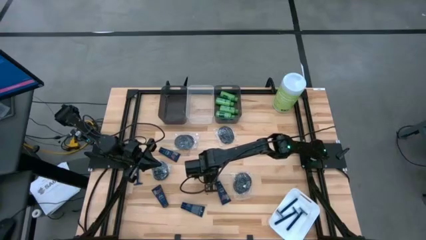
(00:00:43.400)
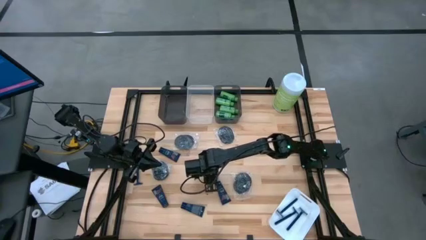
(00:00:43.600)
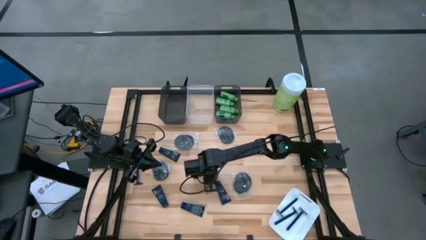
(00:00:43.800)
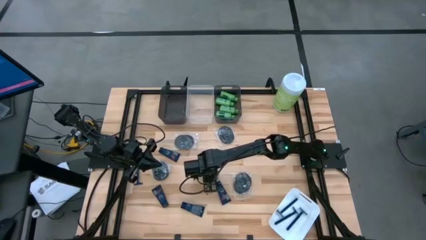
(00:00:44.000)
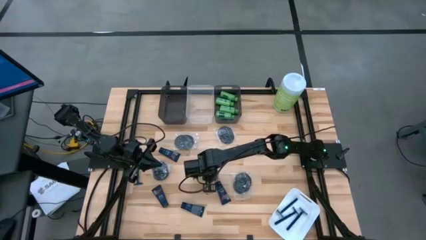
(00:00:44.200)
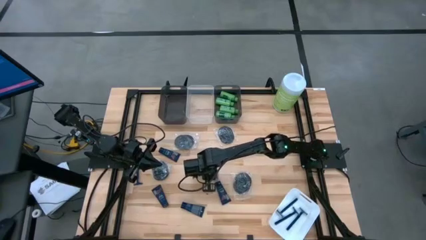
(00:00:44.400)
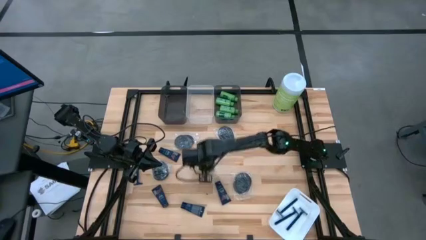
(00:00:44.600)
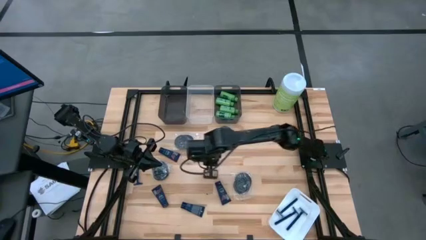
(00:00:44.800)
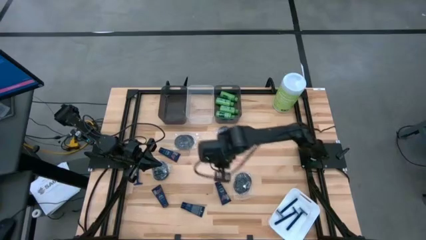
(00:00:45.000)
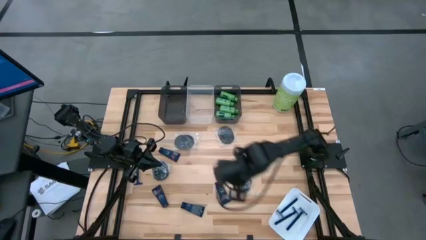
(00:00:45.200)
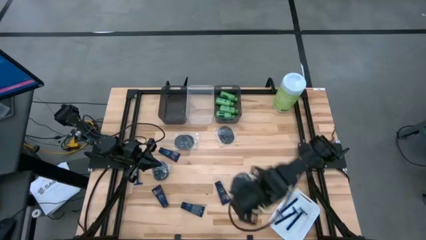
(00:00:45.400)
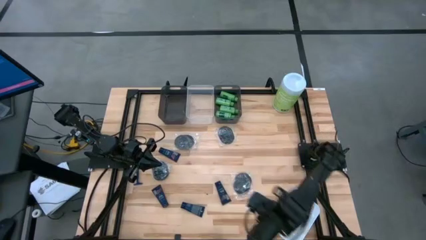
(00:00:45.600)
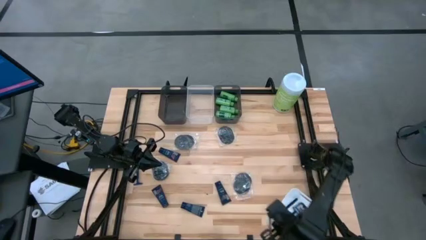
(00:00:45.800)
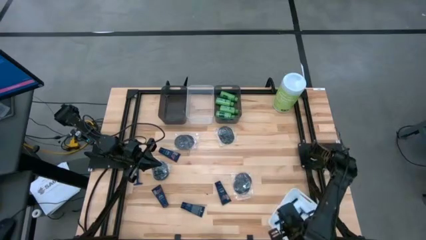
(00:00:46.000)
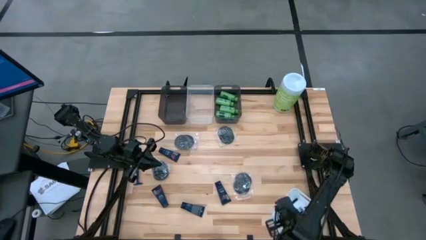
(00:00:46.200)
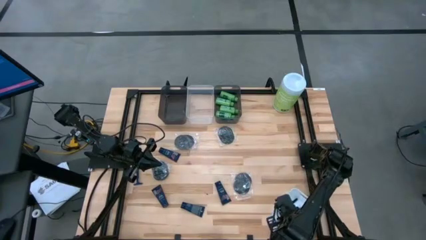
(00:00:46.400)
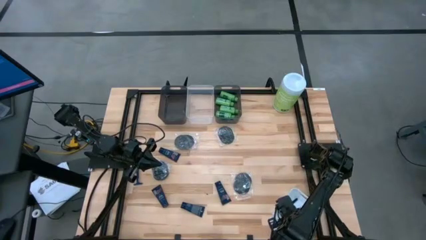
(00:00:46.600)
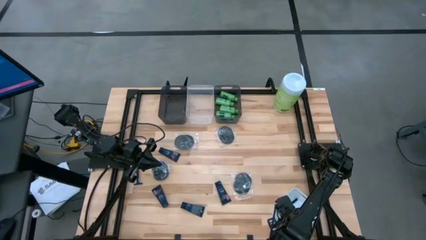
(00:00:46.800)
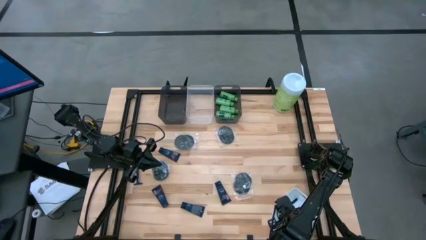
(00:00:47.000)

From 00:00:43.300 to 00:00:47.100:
Task: Pick & Place Travel size toiletries
Put the blue razor into the white bin

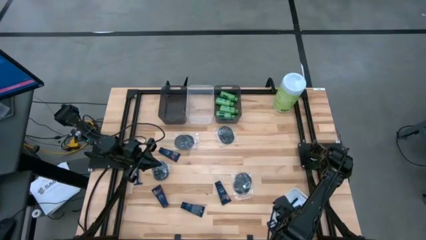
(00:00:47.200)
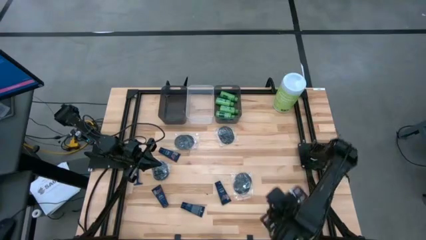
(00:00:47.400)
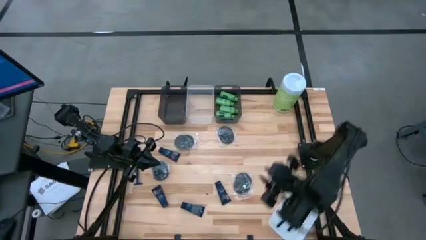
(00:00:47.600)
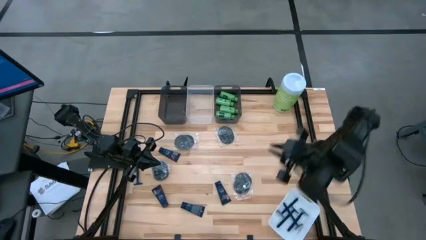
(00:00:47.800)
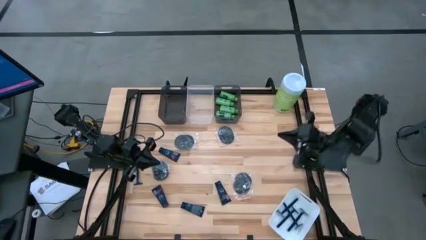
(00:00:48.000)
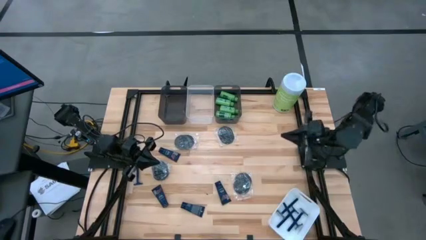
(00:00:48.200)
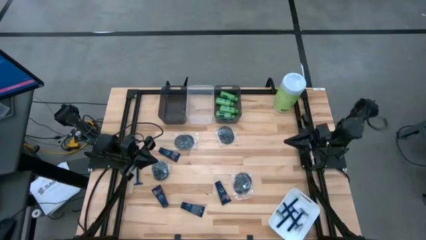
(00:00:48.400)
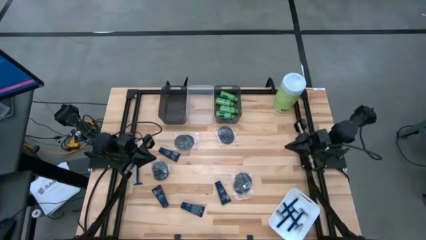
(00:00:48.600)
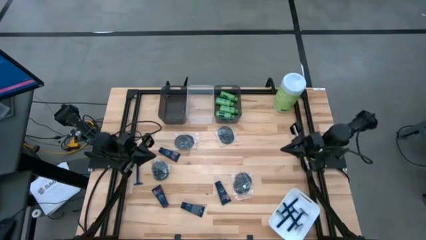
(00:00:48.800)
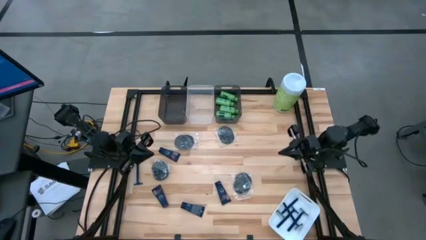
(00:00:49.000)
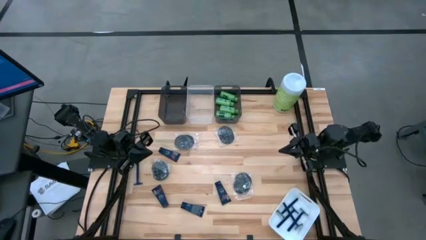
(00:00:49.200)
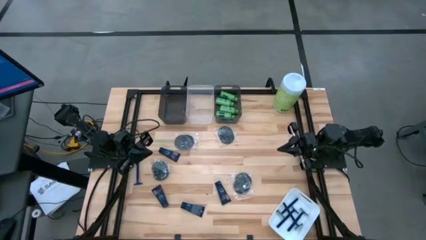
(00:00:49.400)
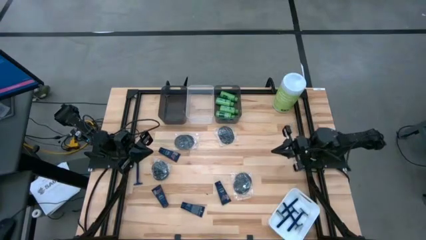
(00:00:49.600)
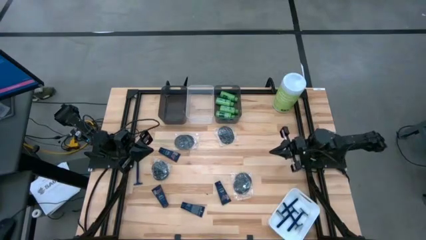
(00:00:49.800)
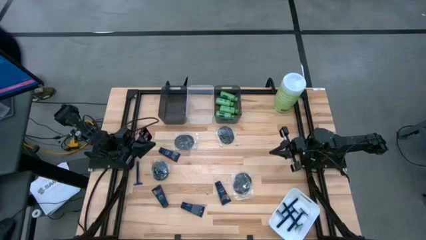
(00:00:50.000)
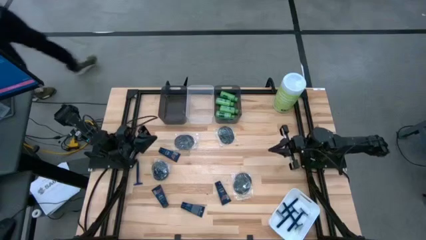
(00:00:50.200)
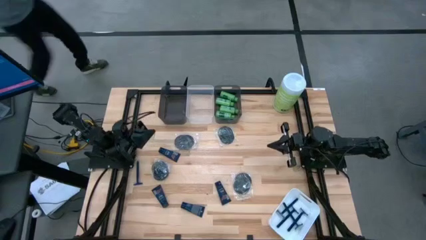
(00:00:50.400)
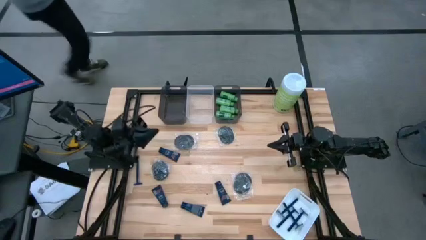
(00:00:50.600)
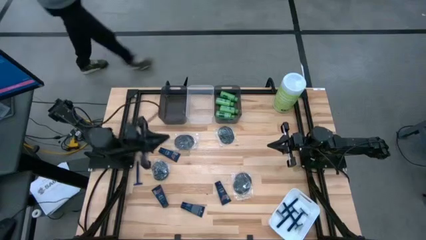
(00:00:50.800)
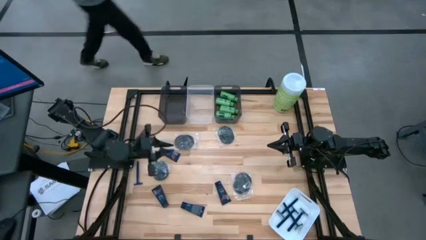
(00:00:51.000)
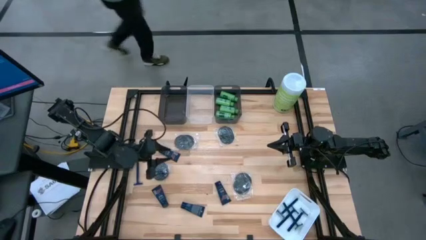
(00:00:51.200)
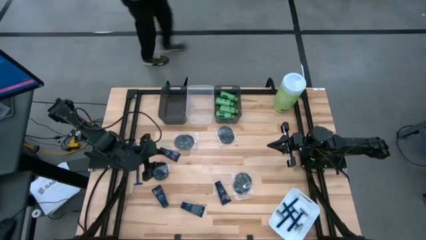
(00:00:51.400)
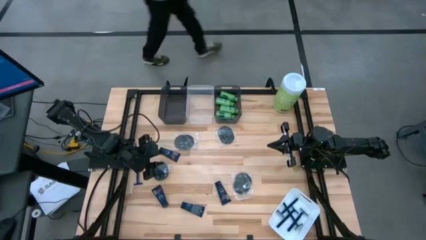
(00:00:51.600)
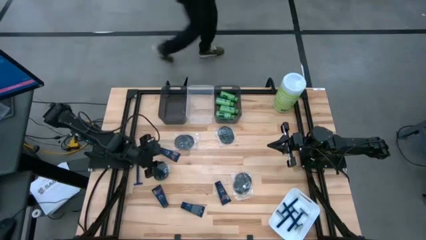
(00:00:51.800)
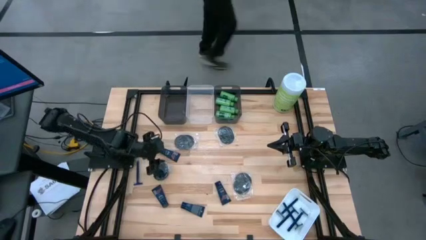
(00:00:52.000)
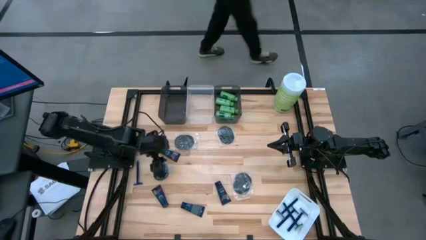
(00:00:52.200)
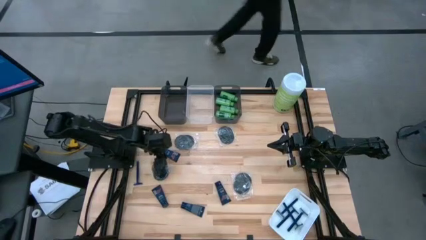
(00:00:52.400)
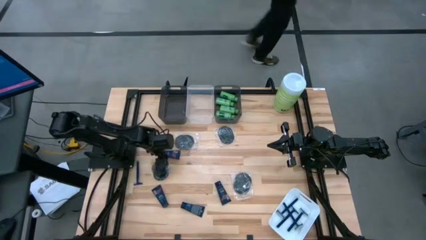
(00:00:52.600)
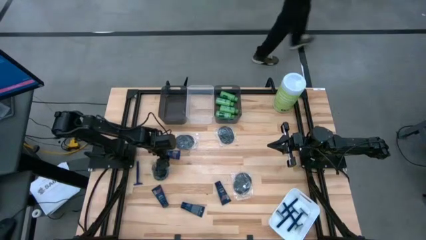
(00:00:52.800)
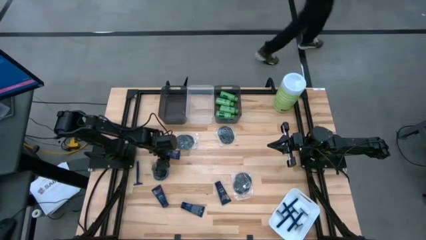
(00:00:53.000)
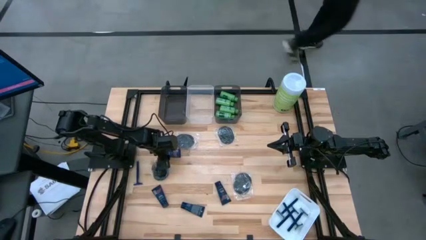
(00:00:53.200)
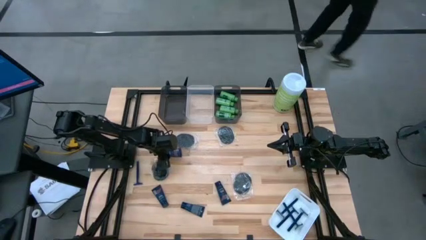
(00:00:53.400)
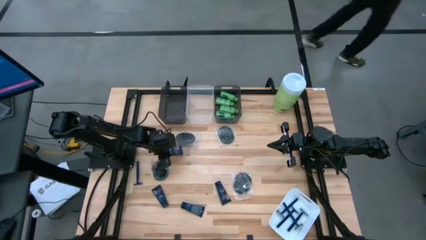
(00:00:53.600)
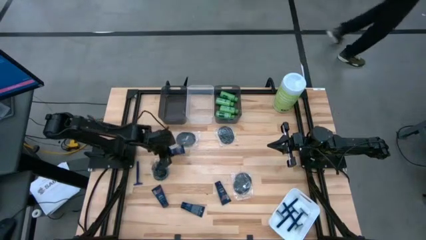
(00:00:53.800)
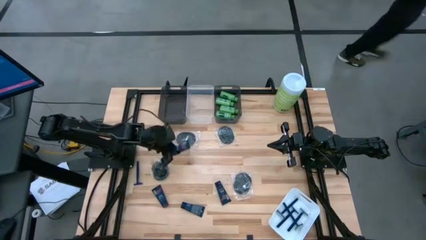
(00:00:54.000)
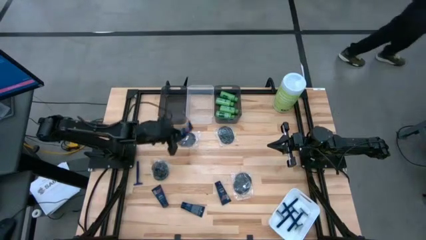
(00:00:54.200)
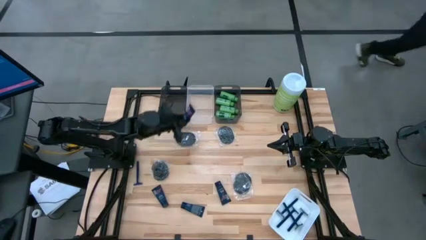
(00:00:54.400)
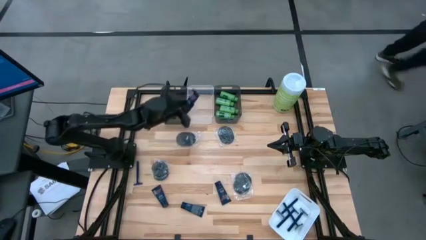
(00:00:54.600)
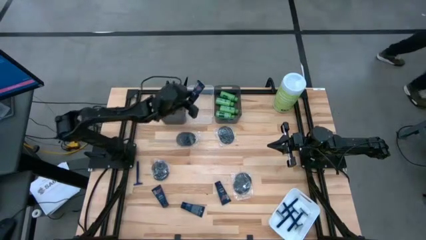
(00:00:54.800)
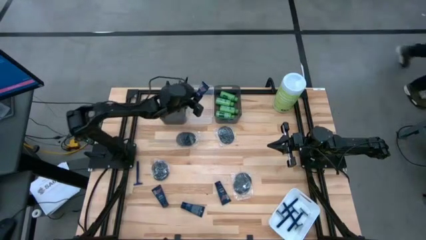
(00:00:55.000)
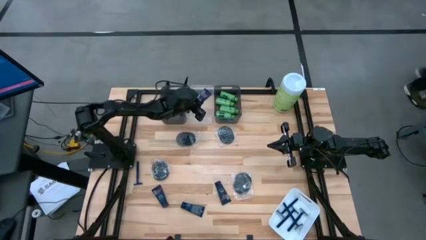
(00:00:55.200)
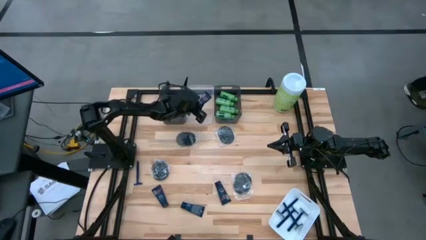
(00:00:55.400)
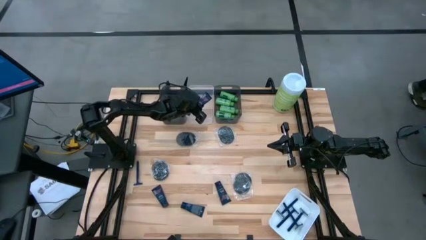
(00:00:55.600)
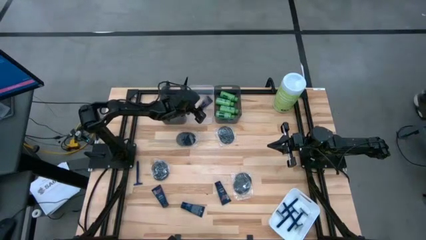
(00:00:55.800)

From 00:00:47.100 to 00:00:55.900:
Put the blue shave cream into the transparent bin

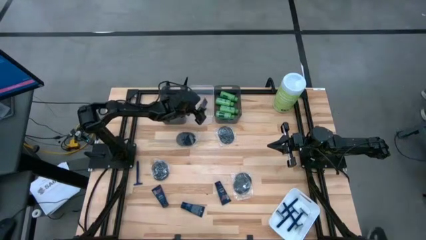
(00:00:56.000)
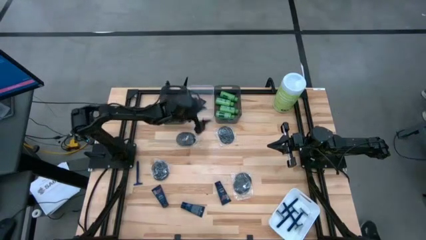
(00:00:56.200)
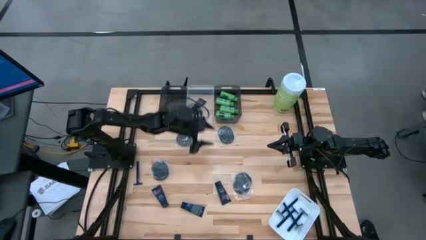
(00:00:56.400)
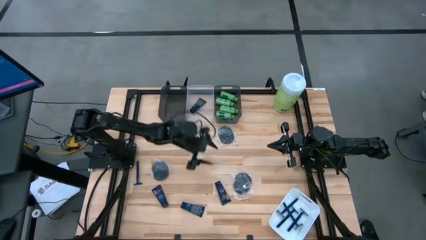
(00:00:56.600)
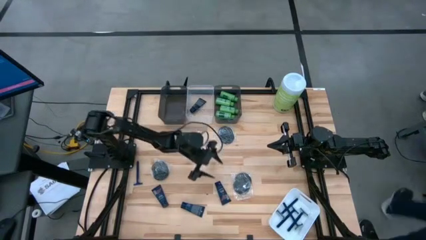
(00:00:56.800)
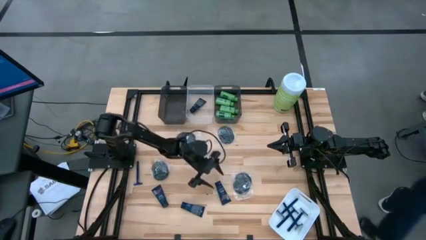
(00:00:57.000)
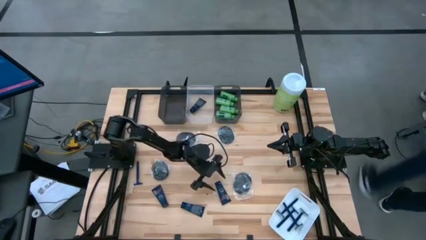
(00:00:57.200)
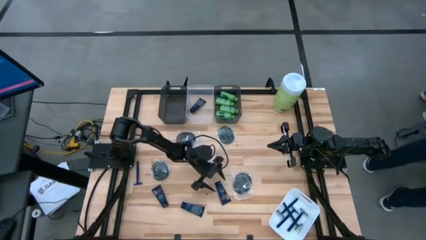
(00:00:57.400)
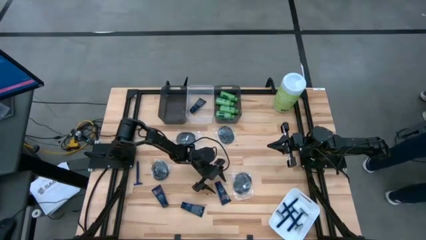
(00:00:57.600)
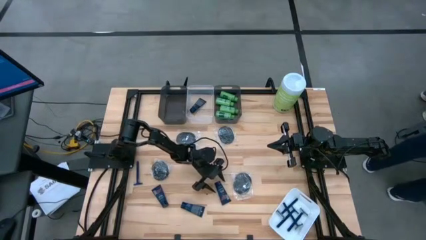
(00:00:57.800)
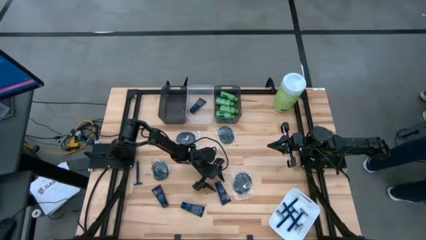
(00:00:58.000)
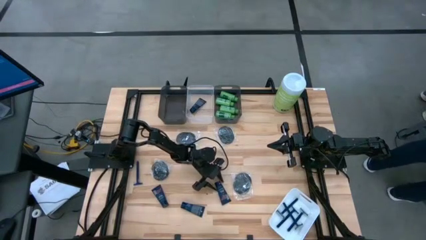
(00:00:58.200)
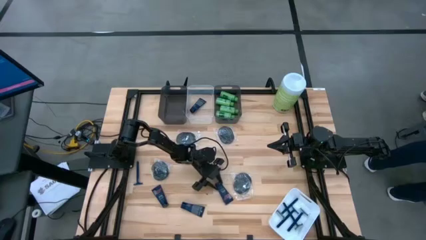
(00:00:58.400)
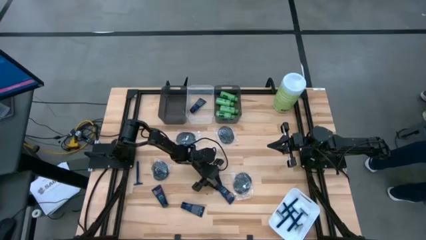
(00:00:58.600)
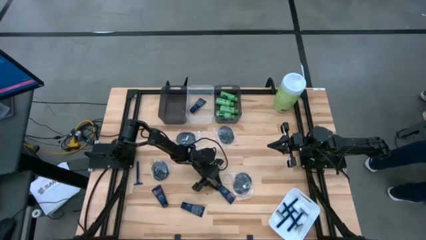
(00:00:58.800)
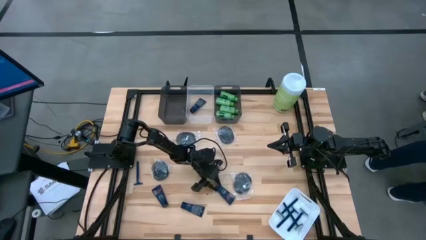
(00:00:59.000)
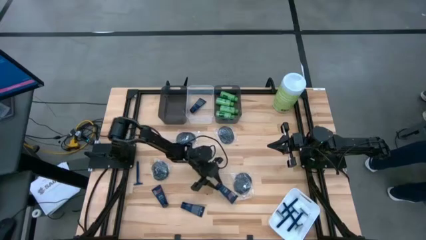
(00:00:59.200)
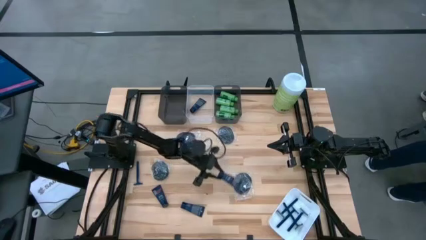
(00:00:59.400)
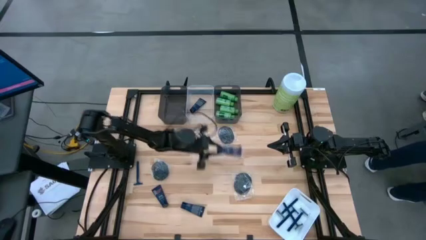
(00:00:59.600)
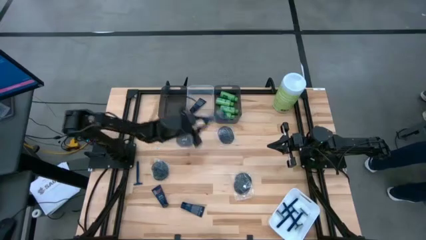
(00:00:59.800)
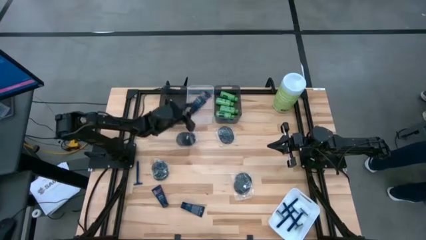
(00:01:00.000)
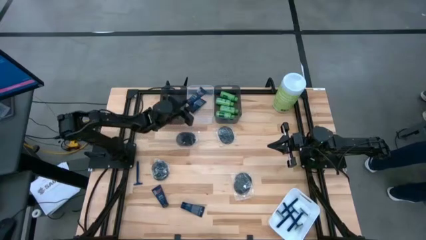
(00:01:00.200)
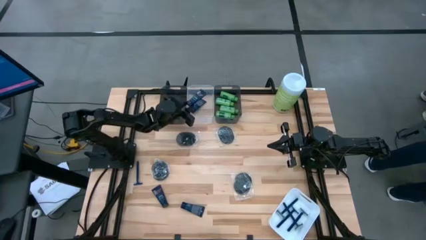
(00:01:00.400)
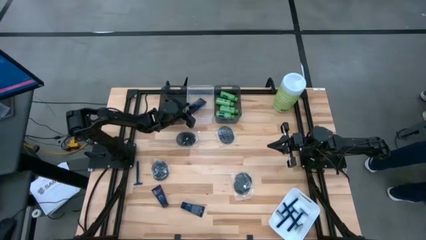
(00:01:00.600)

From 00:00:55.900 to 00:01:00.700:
Put the blue shave cream into the transparent bin
